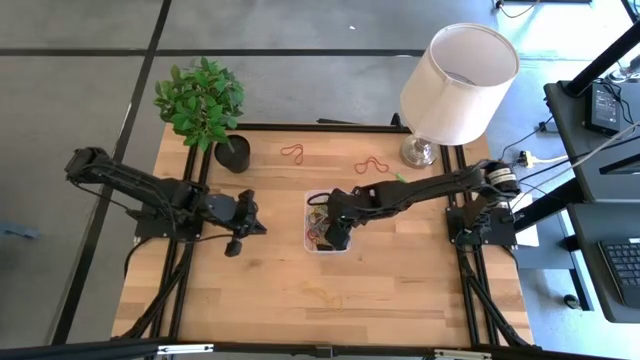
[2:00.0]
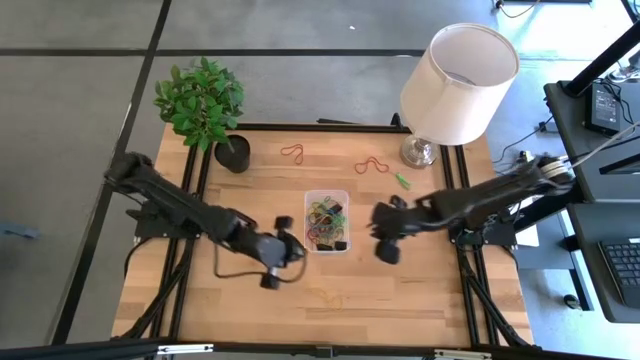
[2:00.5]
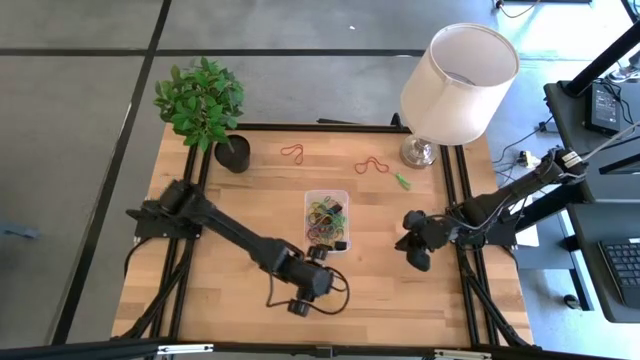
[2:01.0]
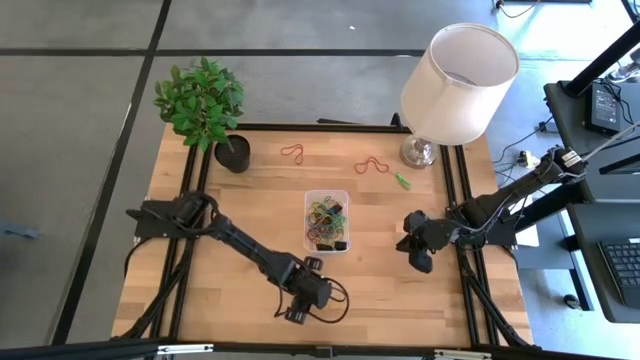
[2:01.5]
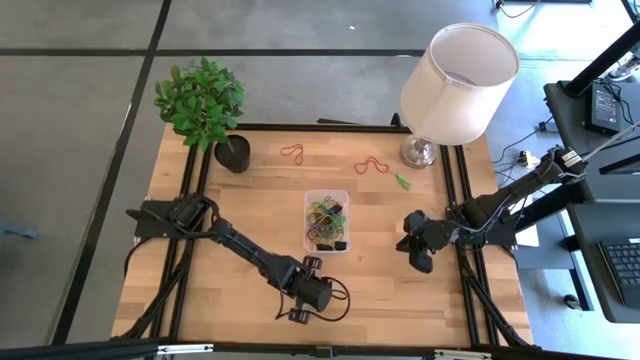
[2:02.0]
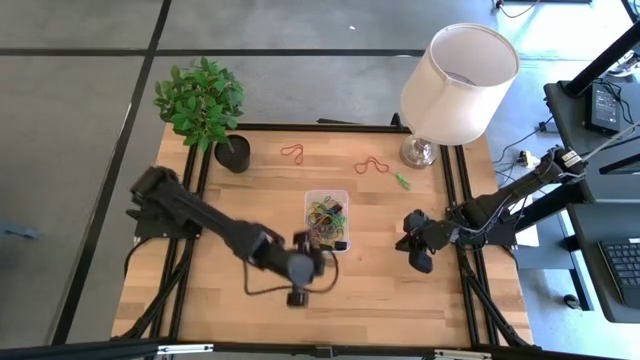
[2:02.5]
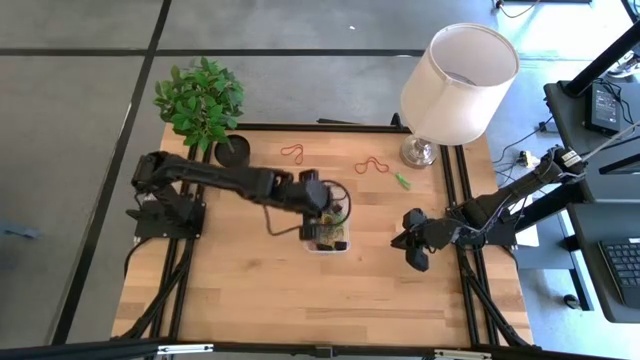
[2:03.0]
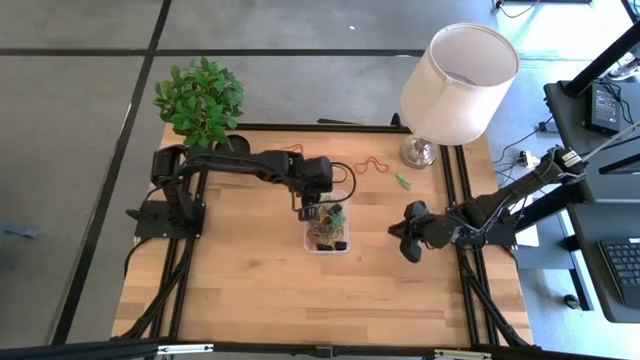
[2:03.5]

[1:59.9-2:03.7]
Task: Pick and place rubber bands into bin
Put the yellow rubber band into the transparent container

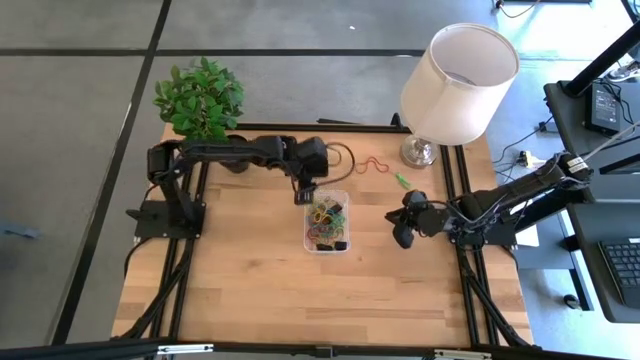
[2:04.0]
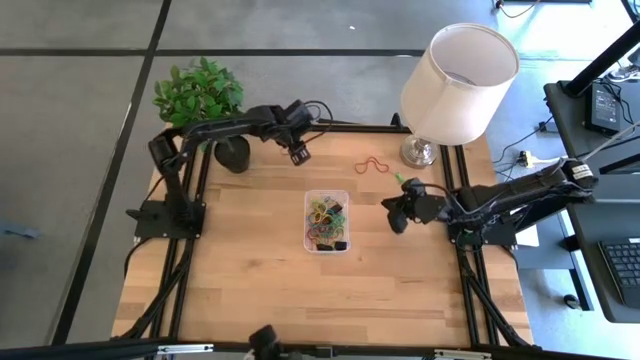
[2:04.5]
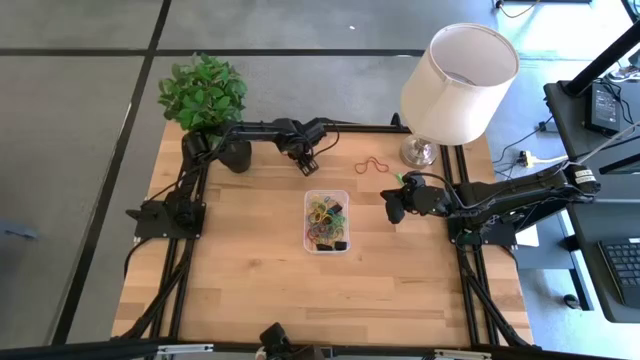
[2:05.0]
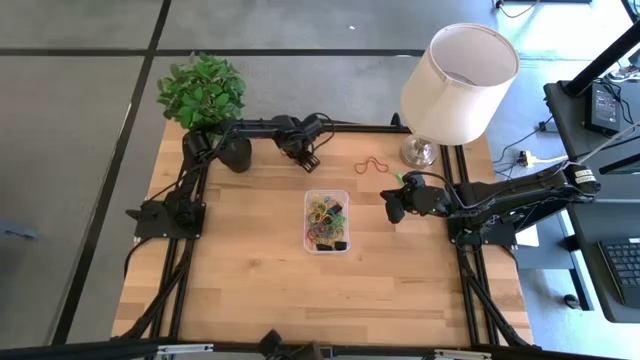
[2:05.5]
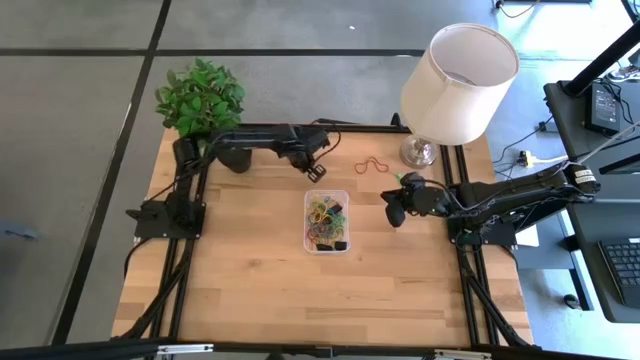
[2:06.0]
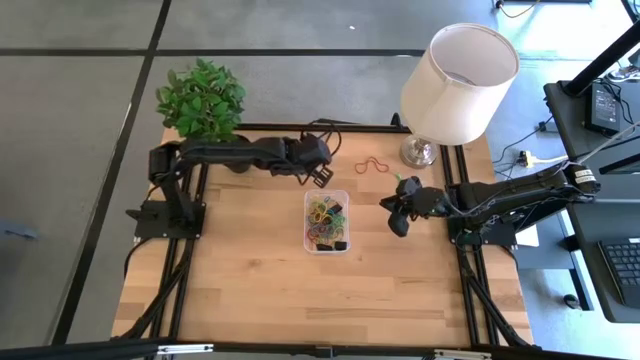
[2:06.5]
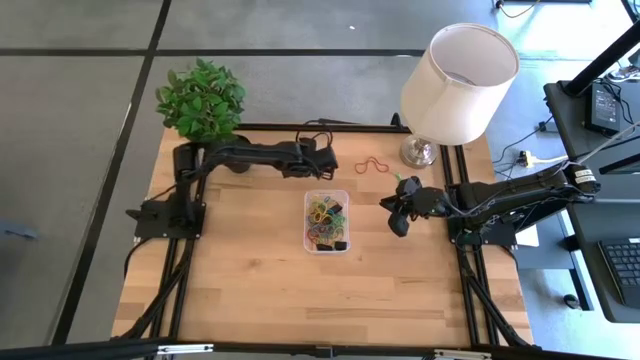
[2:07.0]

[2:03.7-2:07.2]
Put the red rubber band into the transparent container

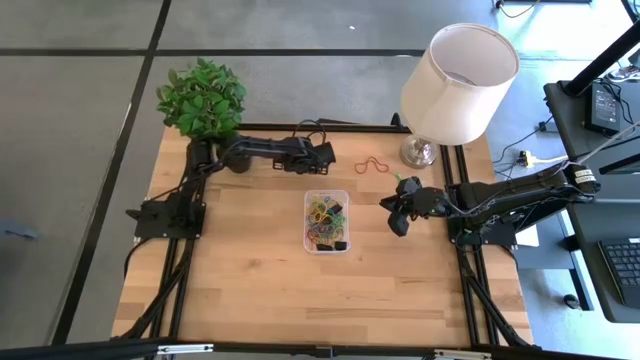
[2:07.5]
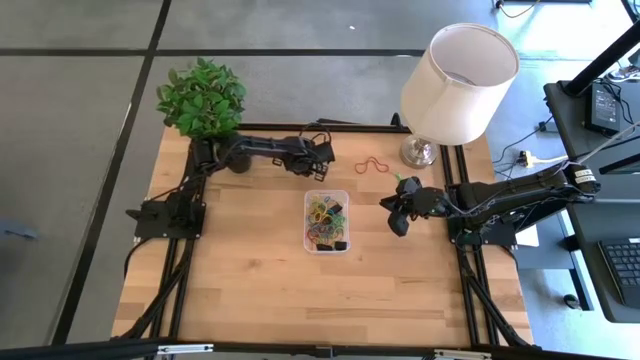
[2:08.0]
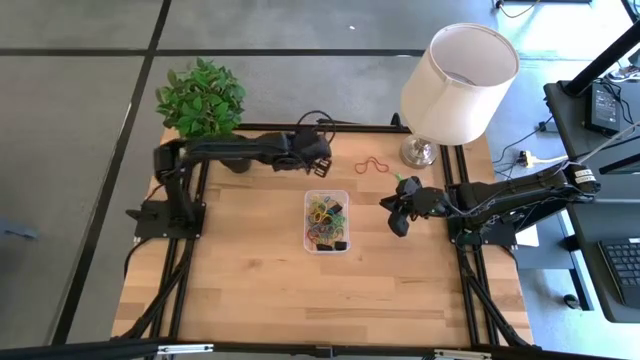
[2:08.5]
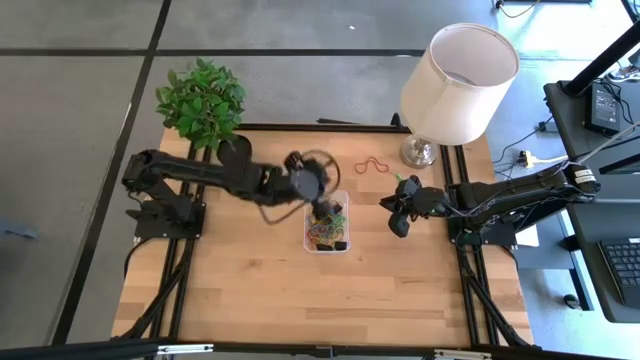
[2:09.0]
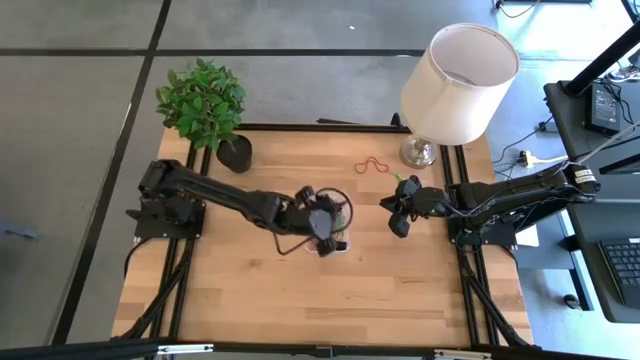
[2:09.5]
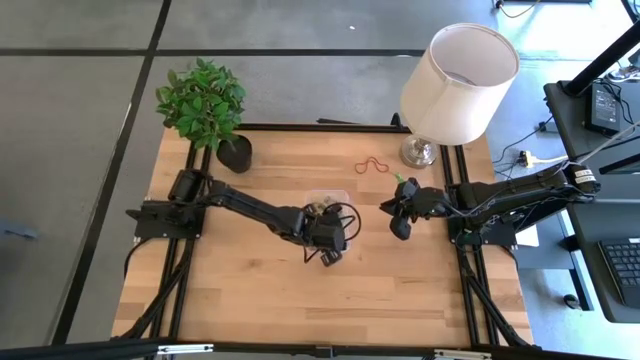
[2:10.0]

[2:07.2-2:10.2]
Put the red rubber band into the transparent container

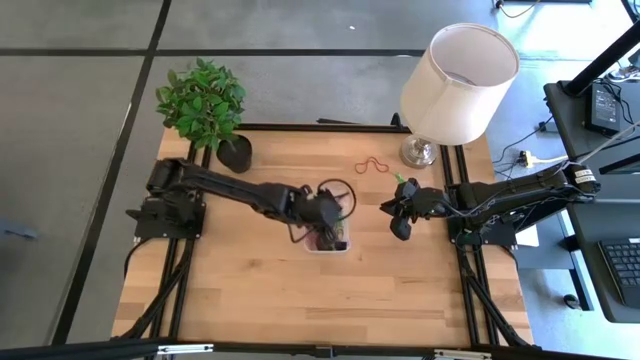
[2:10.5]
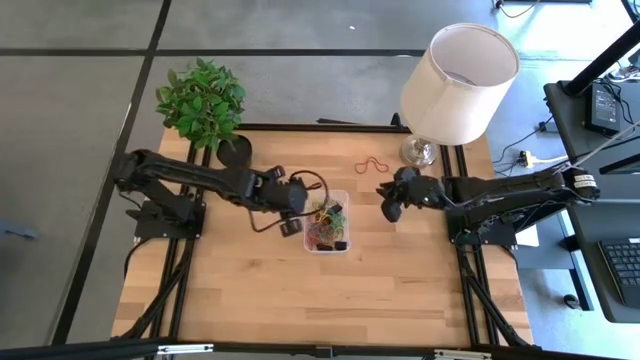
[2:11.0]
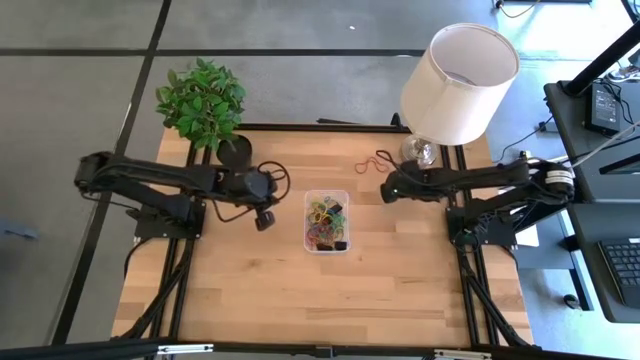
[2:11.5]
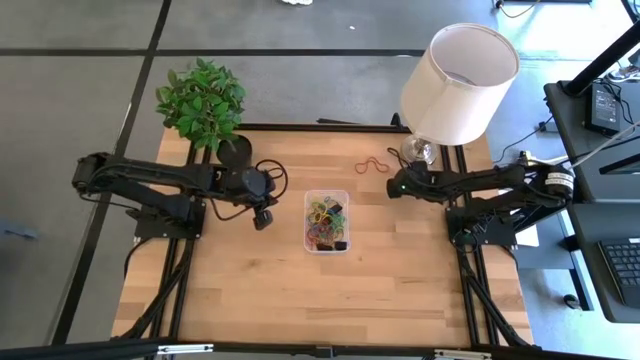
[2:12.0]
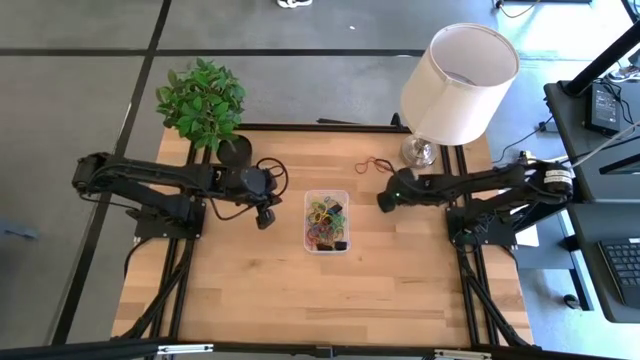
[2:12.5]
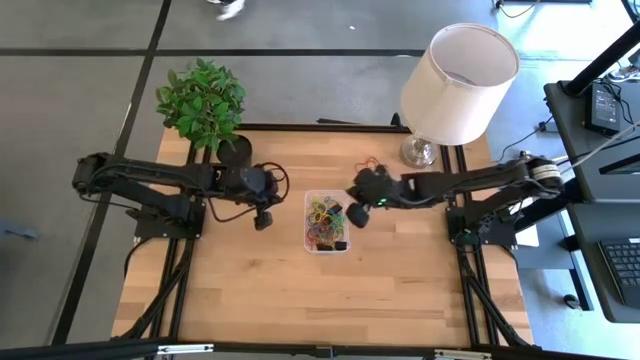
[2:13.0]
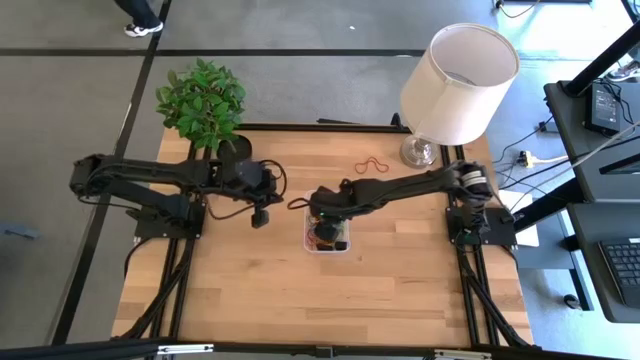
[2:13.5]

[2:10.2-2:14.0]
Put the green rubber band into the transparent container

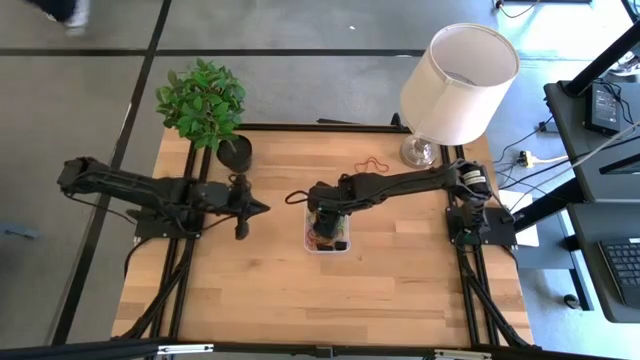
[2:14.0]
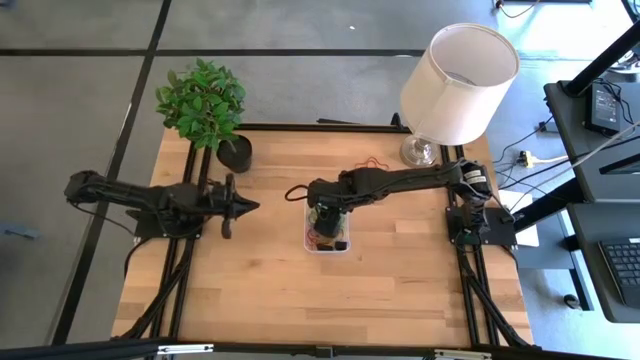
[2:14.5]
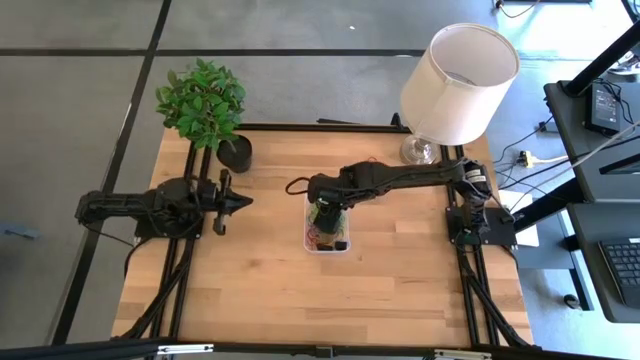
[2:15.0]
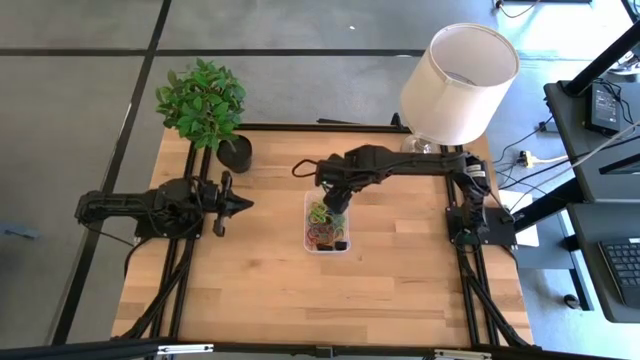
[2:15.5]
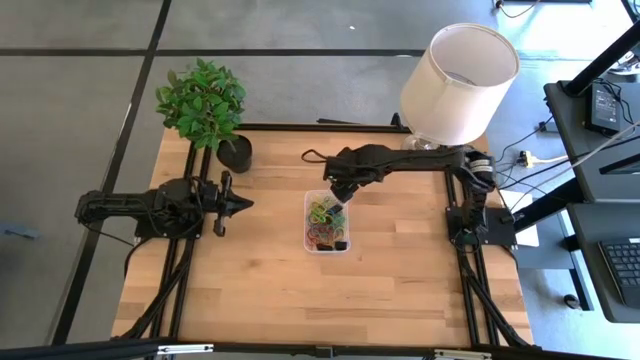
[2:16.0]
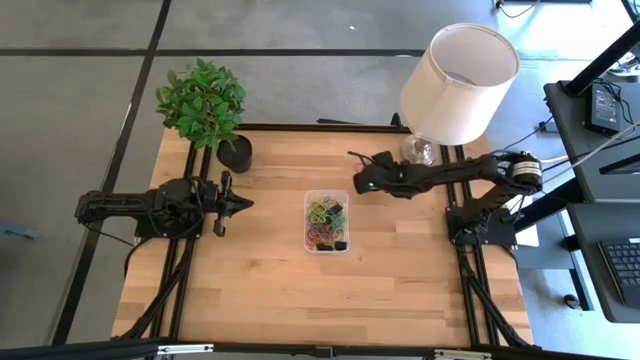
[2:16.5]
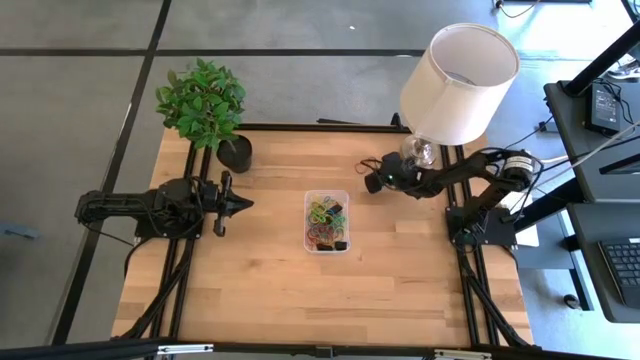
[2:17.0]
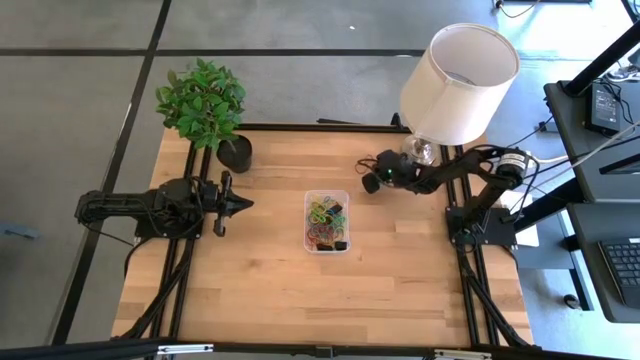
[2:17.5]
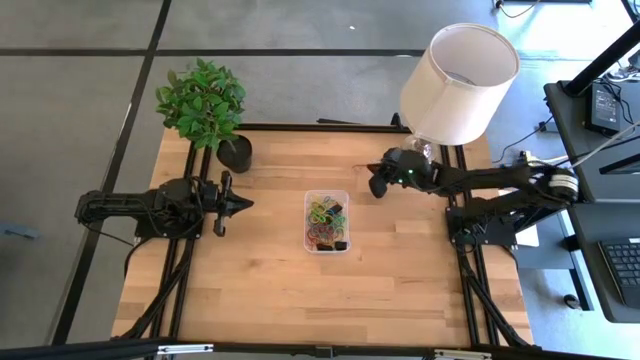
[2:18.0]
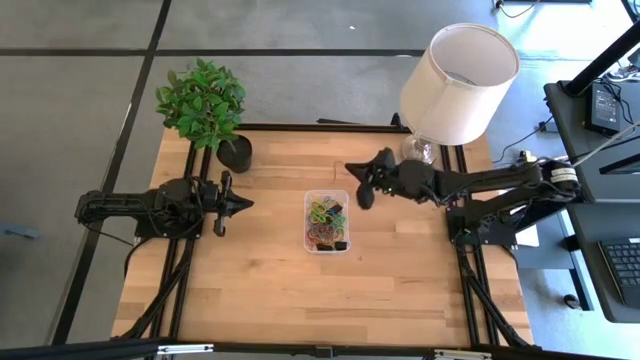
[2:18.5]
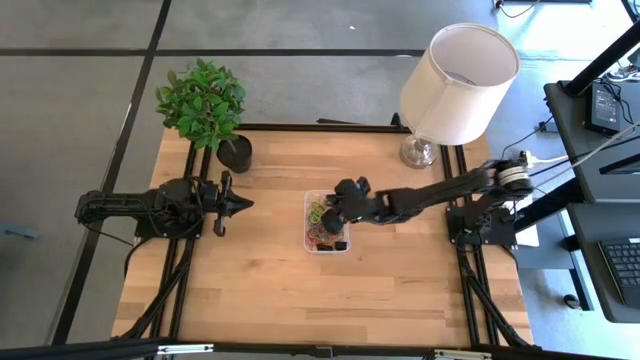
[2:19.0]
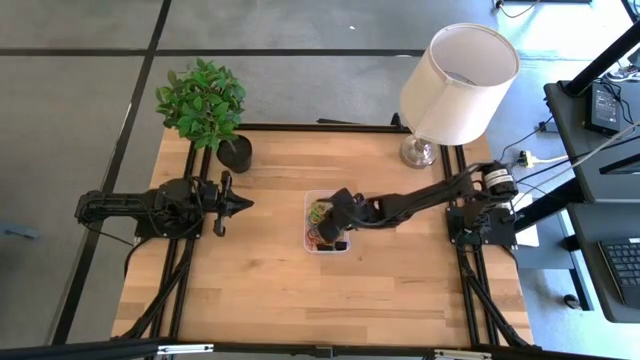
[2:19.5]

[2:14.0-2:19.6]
Put the red rubber band into the transparent container

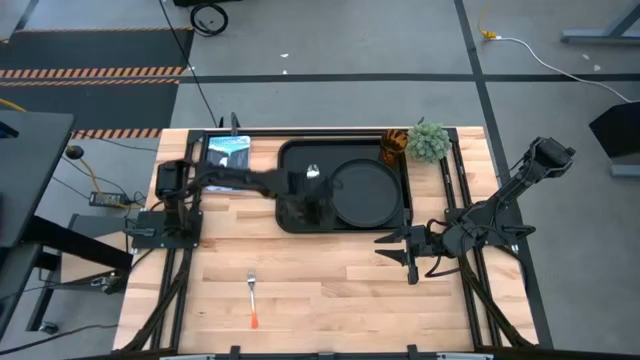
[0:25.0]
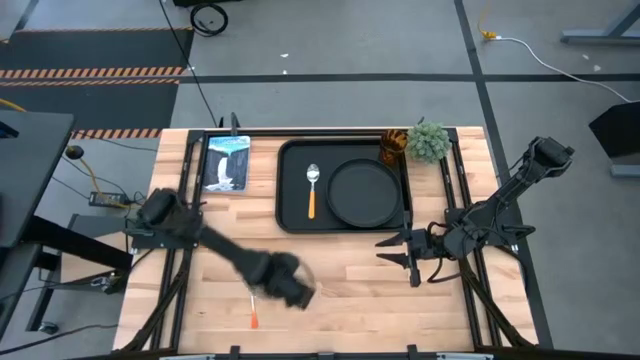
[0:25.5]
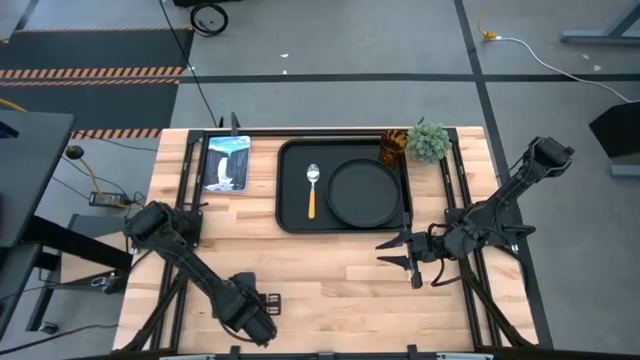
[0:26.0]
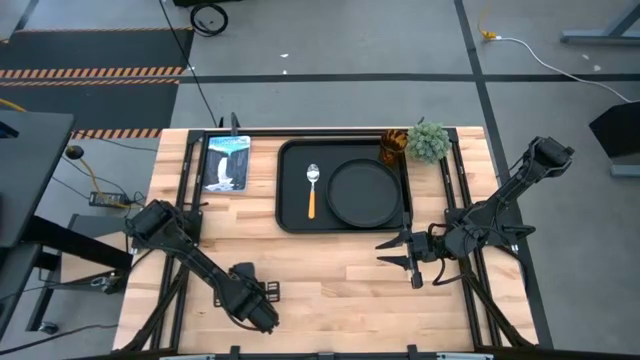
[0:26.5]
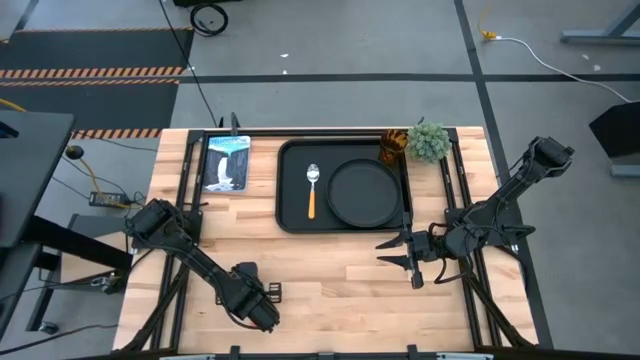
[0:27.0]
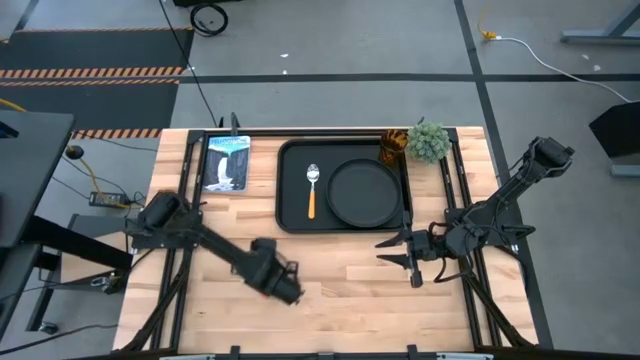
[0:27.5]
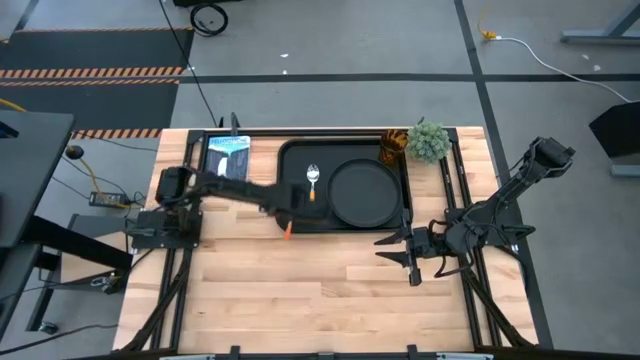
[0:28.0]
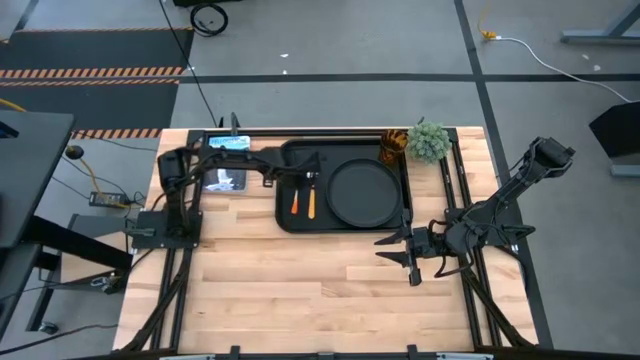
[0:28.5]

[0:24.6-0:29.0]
Task: Pick and place plate/cup/fork/spoon on tray
Put the fork to the left of the spoon on the black tray
